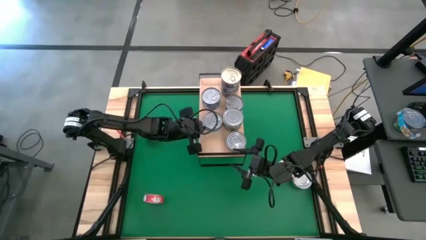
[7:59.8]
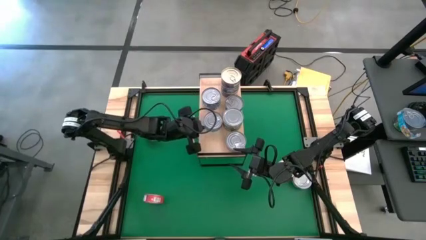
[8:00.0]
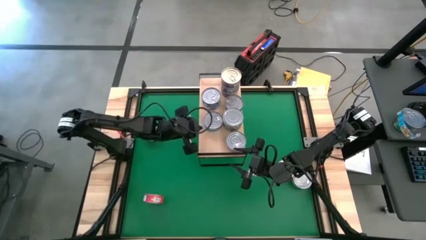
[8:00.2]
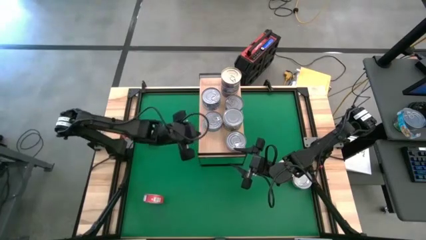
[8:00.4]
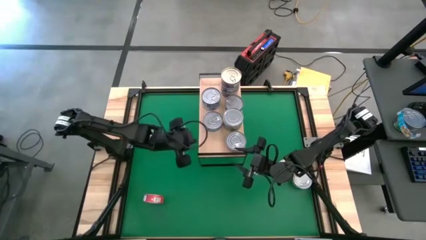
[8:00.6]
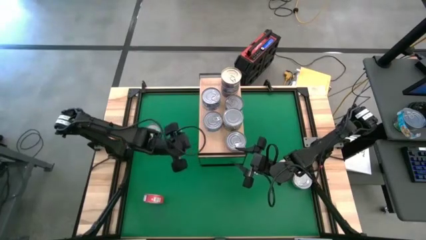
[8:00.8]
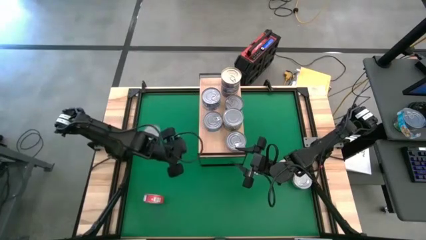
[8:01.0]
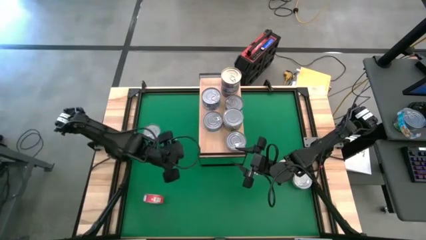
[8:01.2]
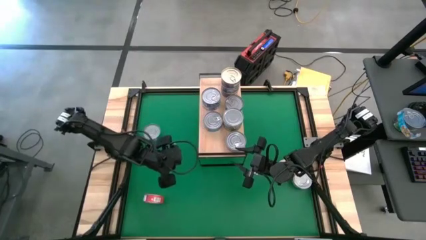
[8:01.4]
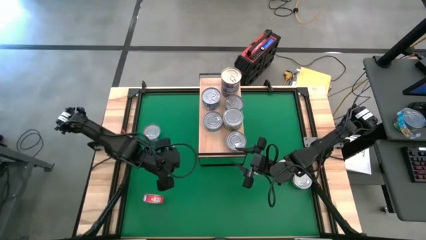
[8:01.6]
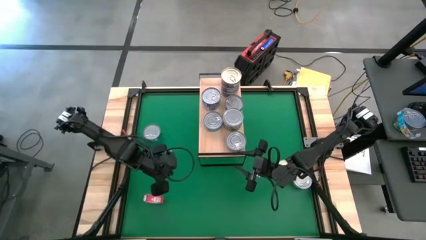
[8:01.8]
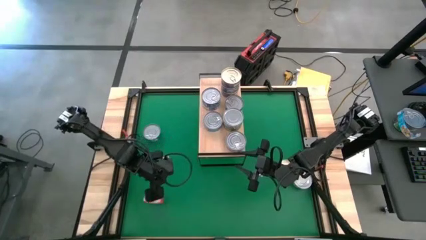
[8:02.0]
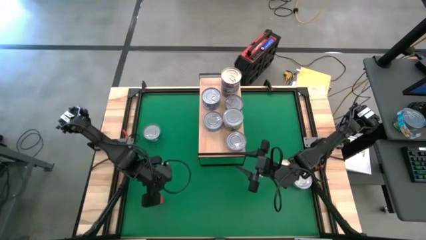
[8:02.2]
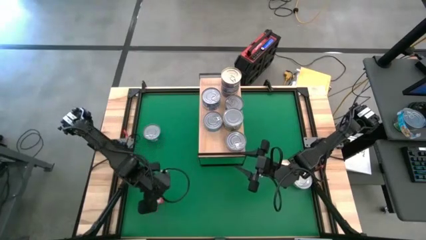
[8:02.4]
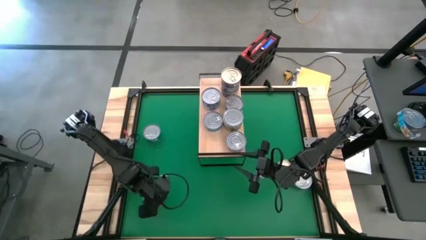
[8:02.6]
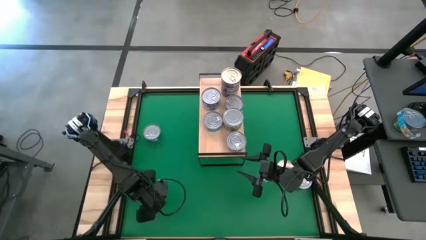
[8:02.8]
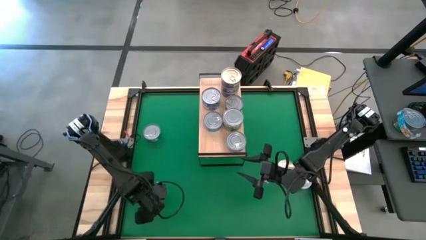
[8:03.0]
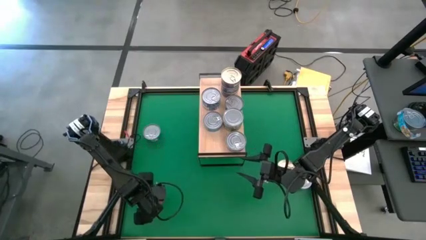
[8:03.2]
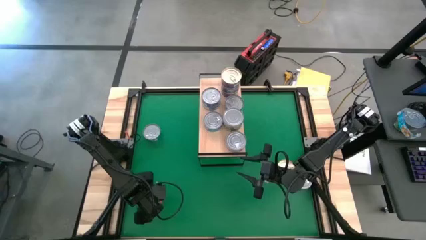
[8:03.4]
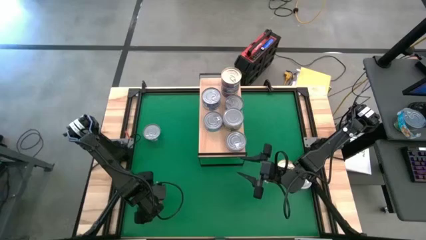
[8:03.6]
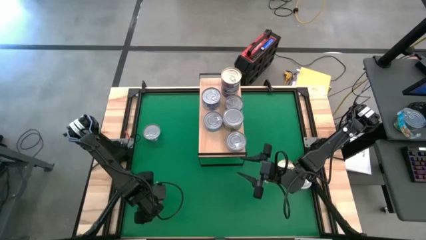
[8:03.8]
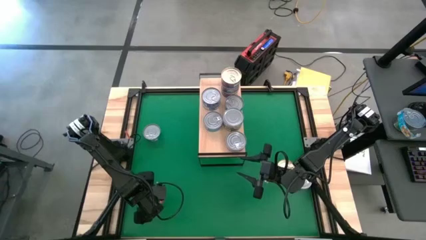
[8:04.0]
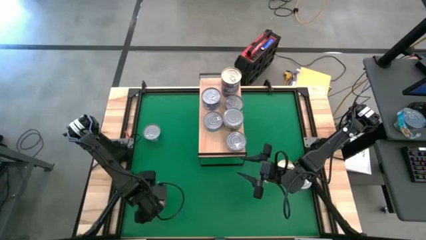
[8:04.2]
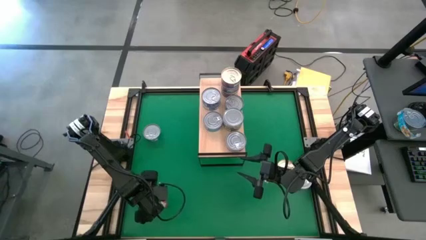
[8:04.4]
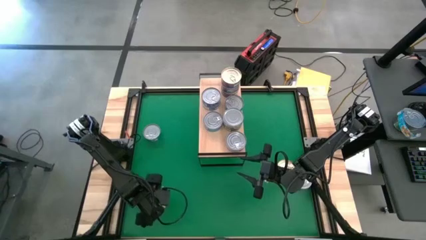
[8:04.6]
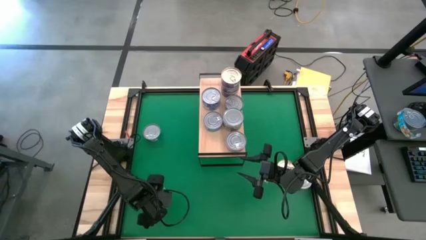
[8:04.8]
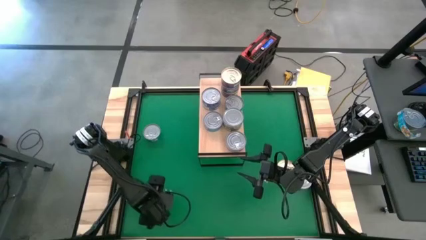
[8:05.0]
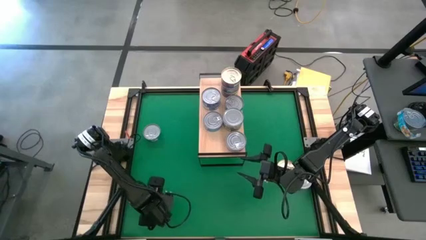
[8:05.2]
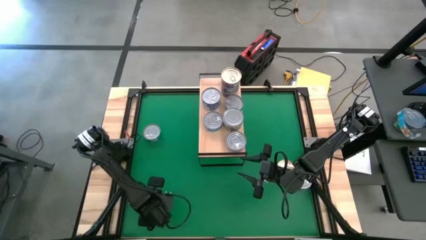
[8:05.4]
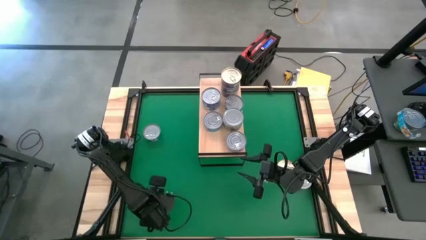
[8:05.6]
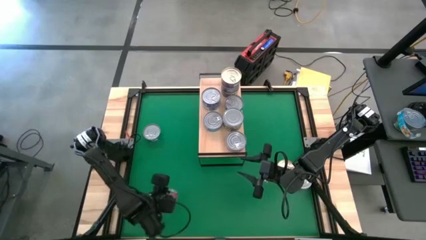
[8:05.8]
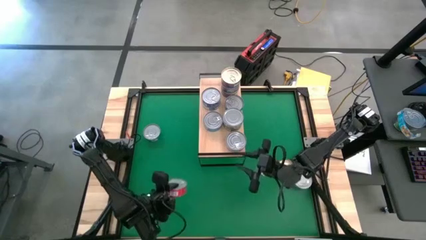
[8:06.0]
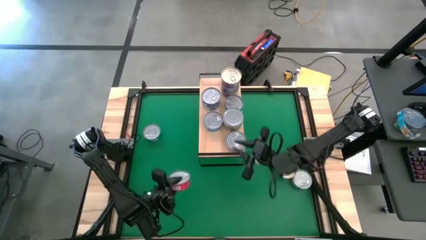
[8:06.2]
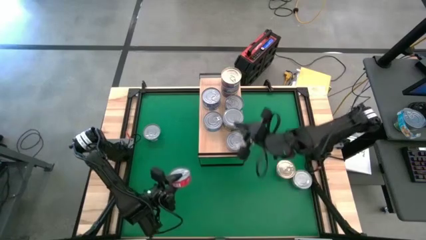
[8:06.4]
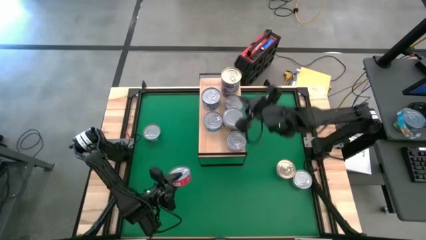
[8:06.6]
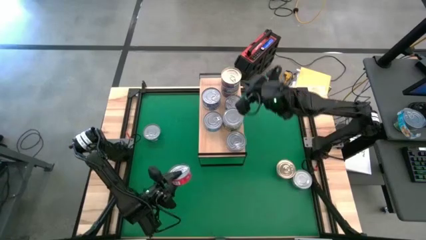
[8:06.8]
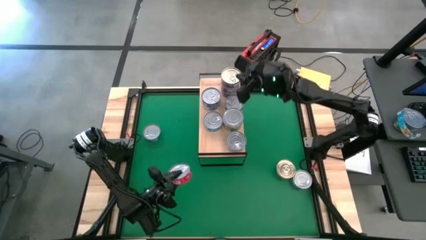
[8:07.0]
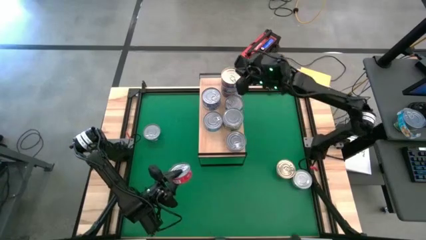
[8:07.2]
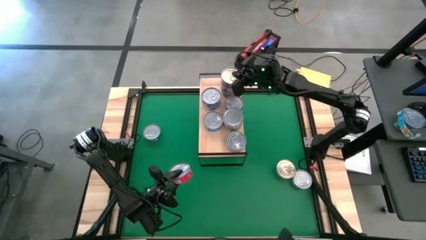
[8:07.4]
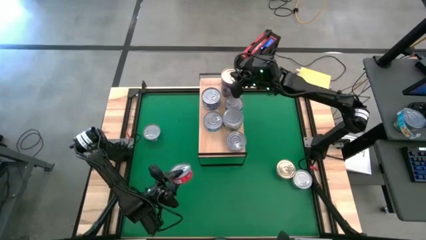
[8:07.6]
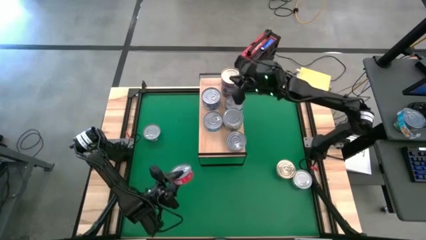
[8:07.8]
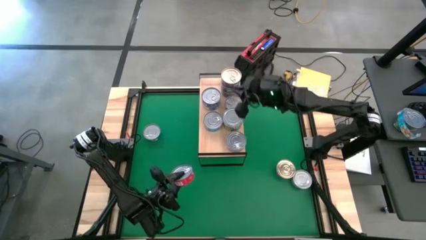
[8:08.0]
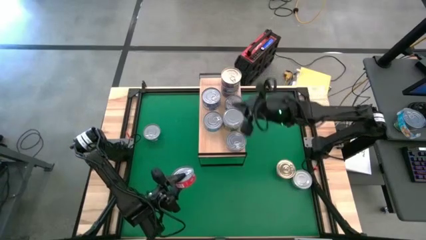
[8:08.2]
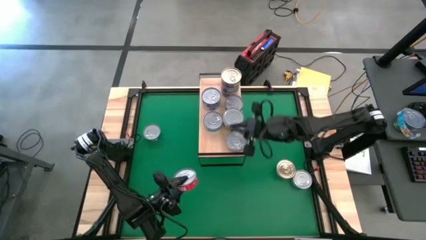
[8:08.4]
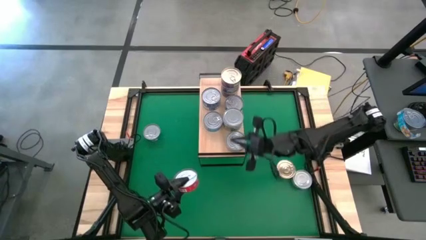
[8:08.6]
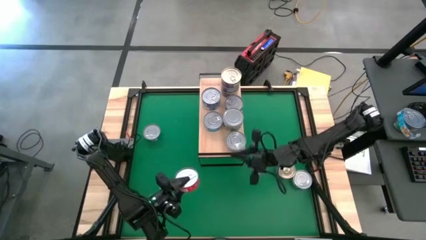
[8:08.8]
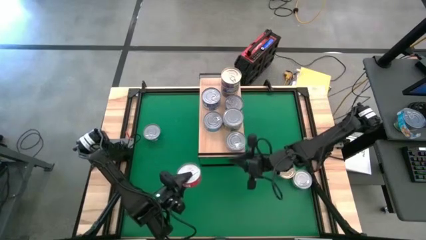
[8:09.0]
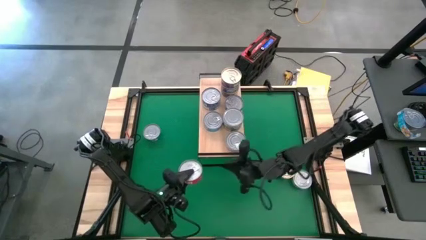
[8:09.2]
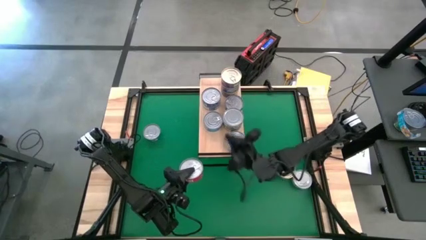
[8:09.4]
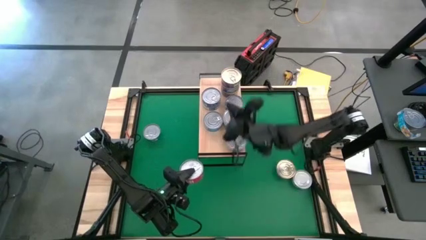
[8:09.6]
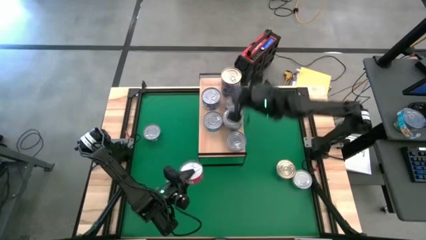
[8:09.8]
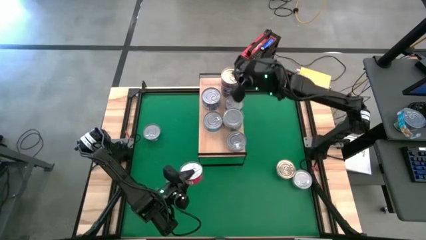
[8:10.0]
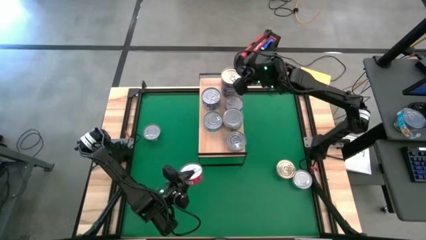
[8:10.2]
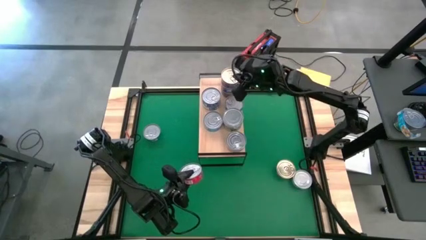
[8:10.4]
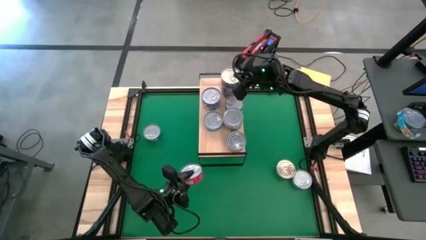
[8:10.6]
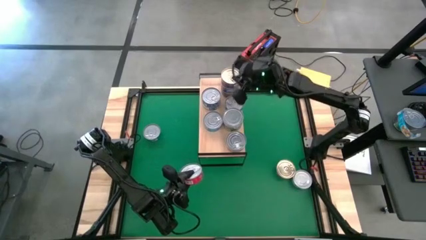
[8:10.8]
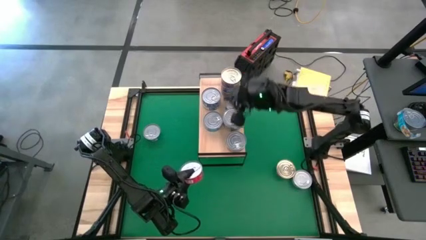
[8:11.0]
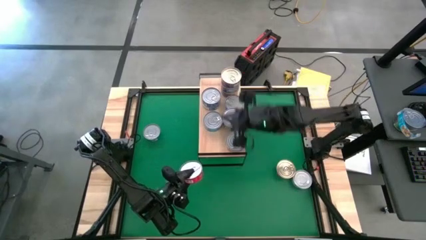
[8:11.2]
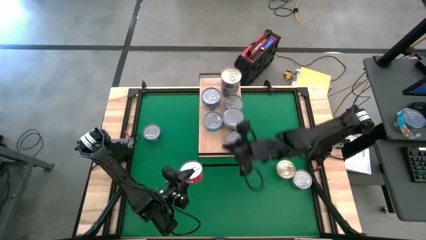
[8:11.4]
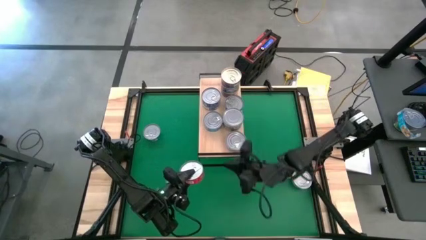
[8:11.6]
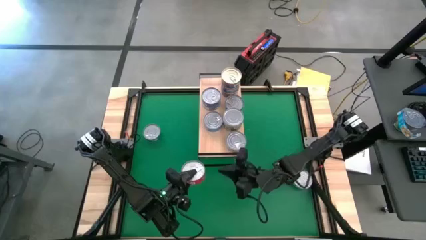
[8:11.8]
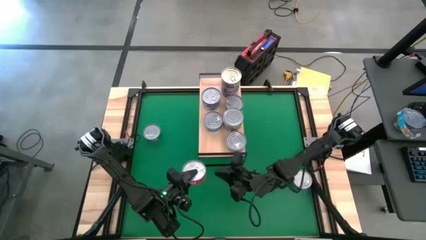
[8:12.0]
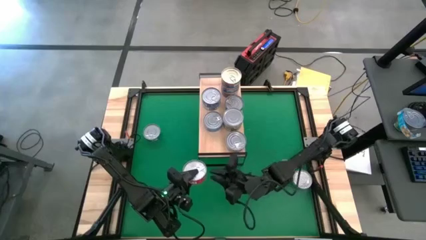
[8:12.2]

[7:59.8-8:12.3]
Task: Stack canned seafood by type on shelf
Stack the red tuna can on top of the red tuna can on the shelf
